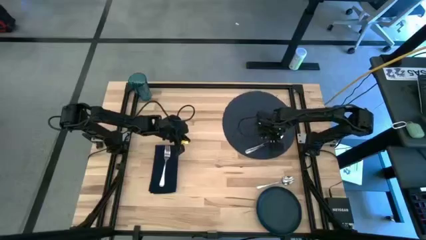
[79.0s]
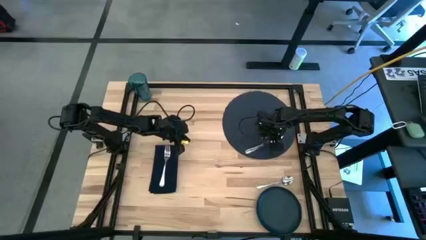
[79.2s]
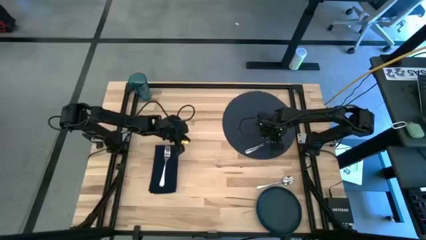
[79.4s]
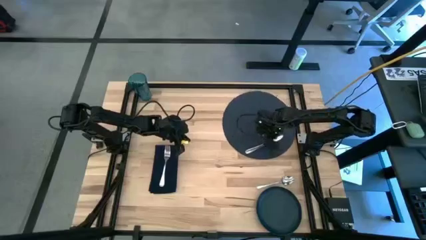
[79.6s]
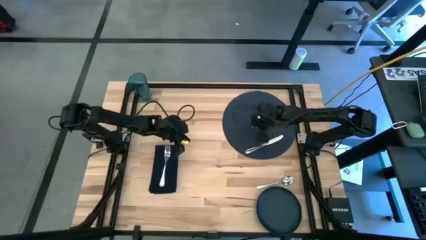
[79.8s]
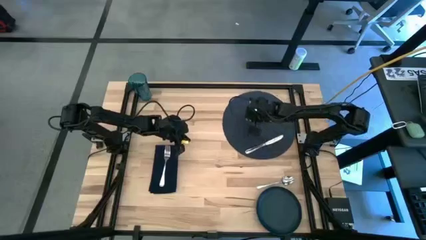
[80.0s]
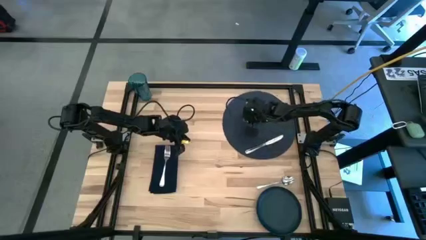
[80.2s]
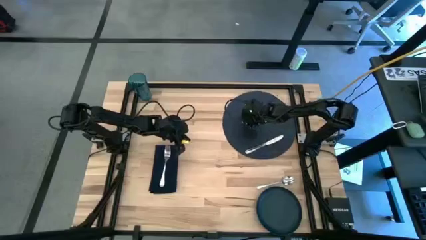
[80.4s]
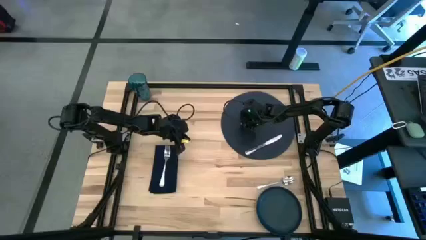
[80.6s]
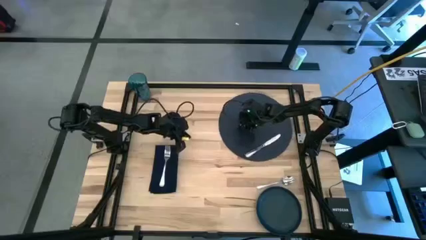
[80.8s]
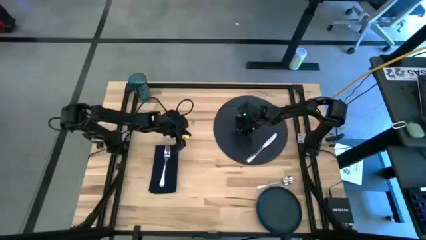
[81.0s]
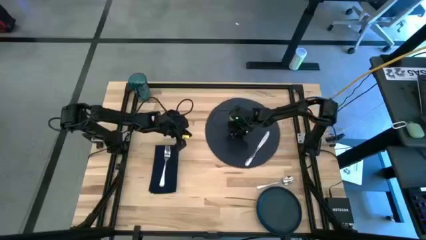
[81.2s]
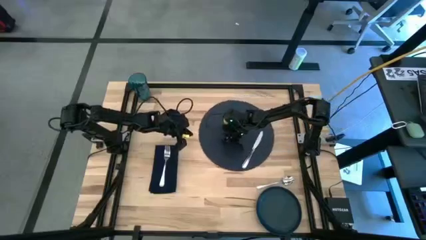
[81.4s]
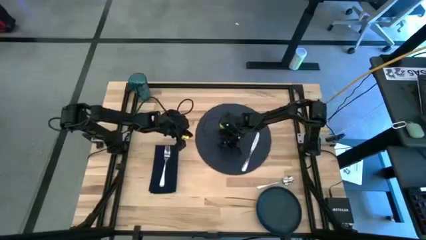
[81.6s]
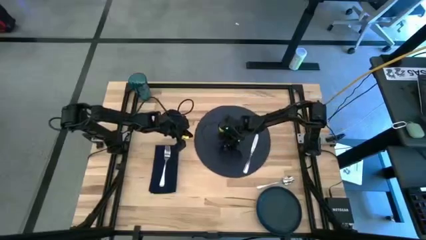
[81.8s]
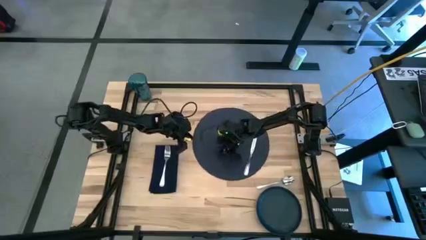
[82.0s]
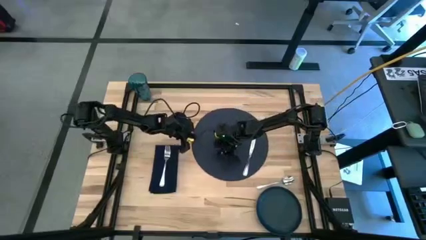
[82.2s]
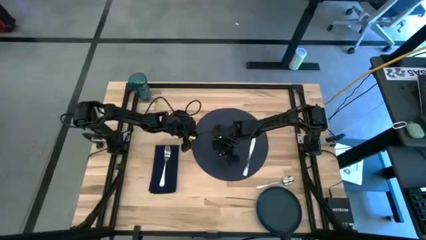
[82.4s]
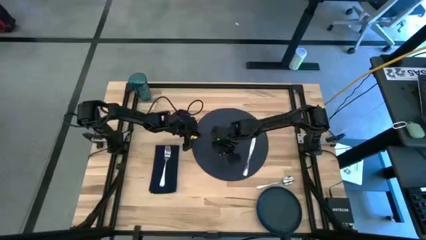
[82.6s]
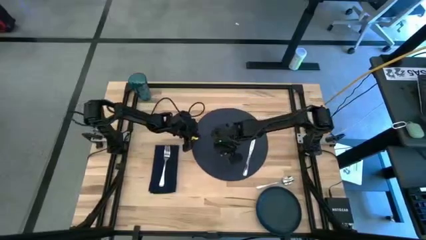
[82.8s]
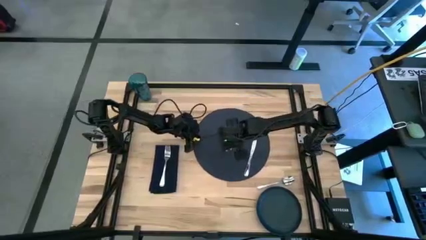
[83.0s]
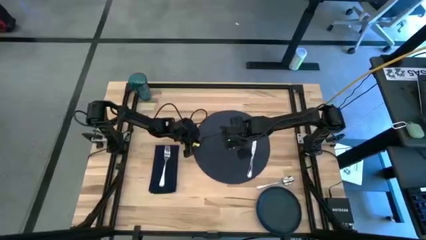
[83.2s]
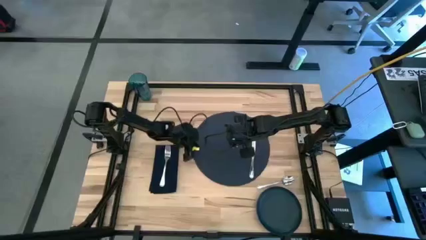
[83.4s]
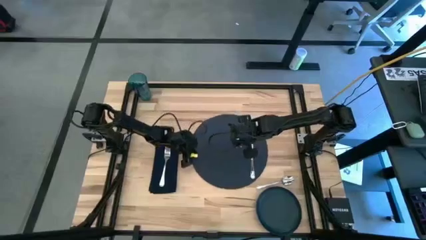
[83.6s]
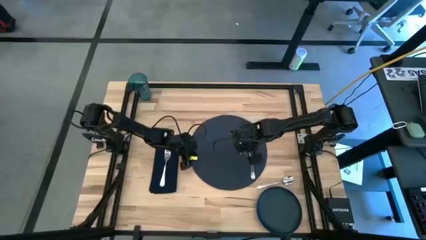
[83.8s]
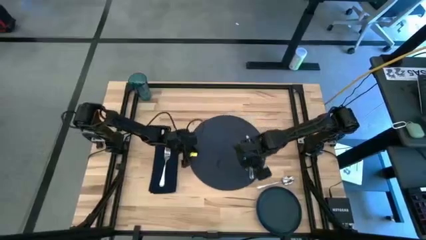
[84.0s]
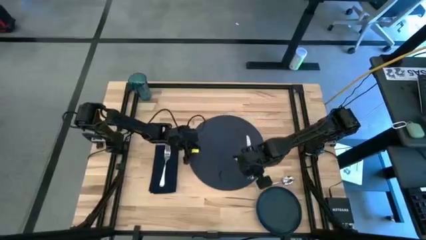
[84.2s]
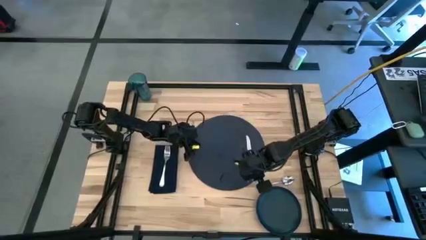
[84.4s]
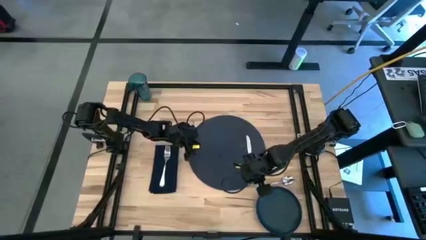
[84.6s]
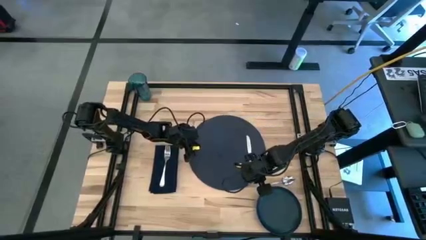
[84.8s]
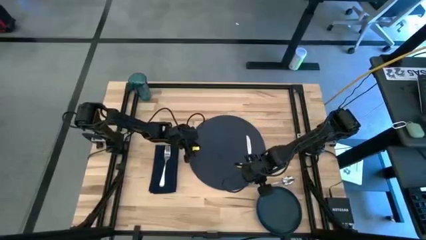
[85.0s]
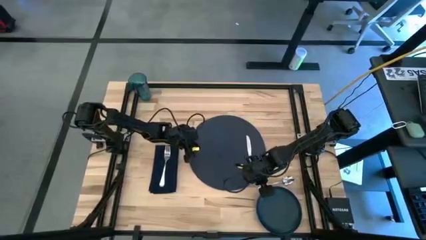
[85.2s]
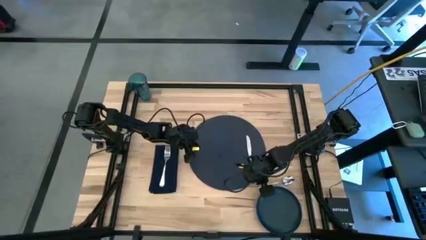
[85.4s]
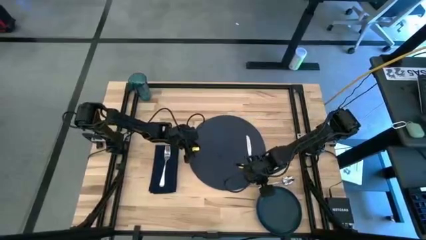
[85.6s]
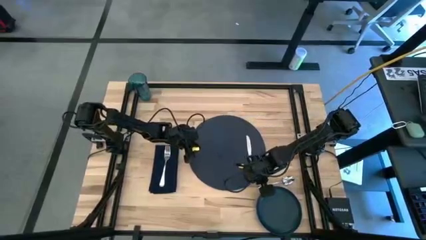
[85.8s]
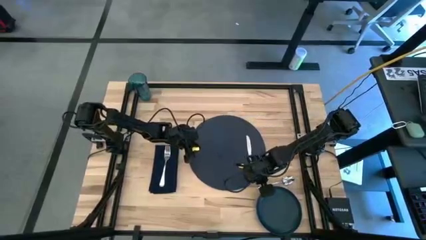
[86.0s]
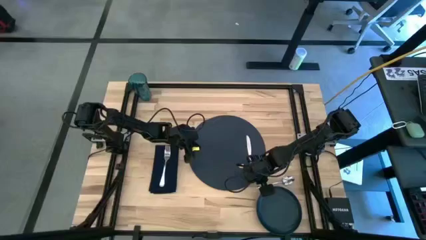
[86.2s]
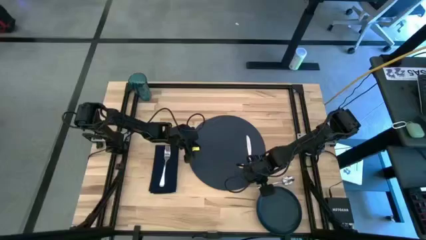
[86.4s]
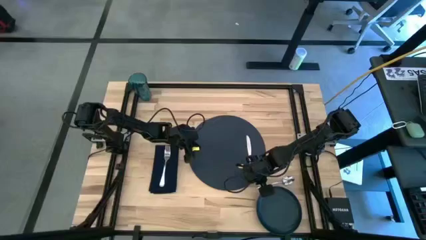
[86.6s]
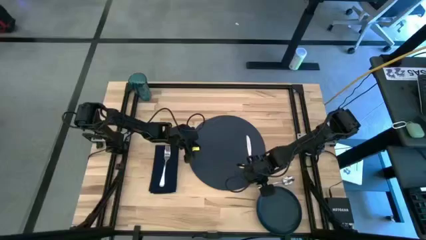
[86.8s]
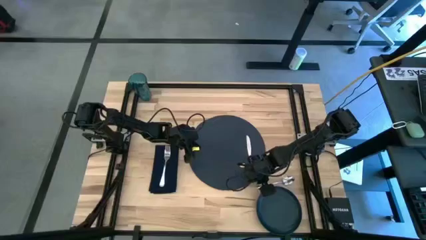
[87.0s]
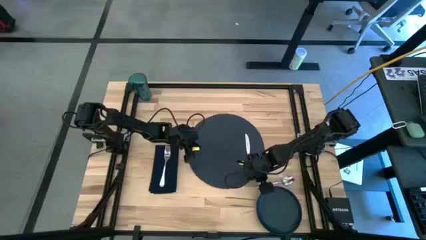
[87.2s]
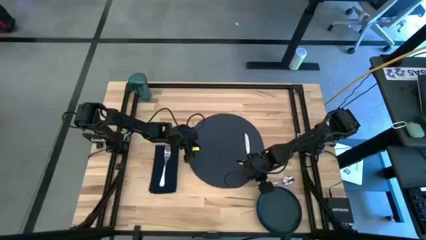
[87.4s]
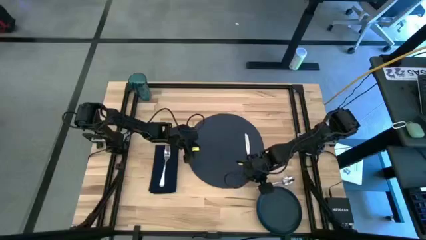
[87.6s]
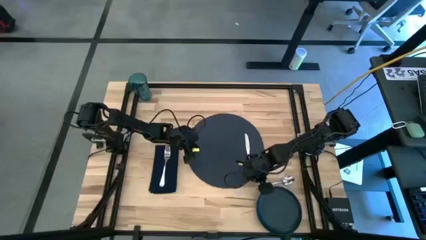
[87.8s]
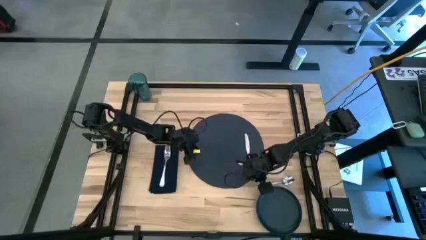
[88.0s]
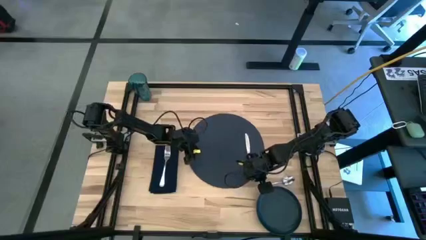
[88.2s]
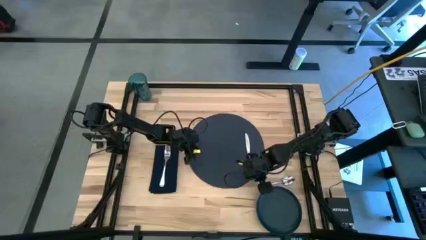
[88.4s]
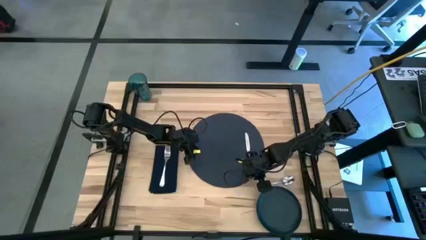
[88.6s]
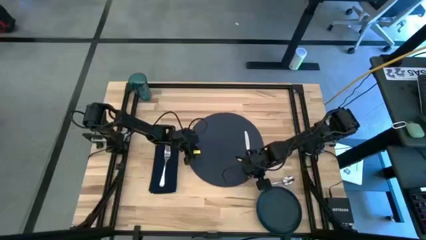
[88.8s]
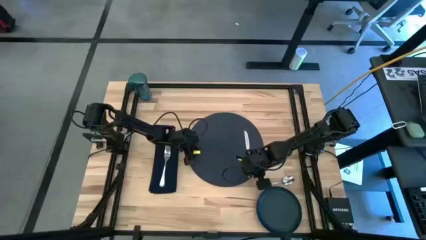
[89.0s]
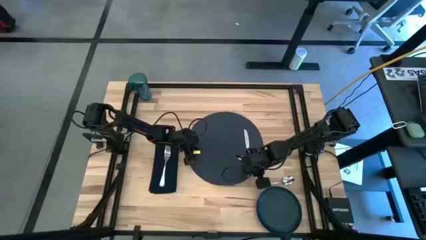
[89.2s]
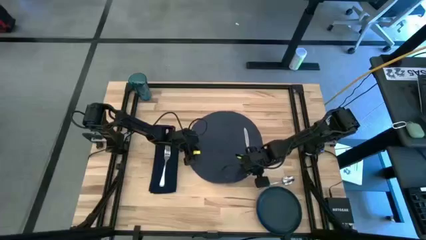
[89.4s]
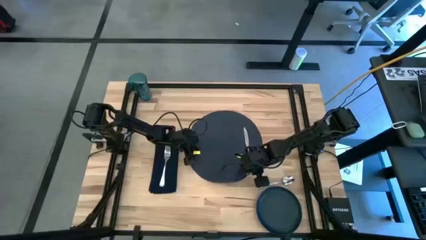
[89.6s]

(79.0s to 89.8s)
Task: Set table place
Move the black tablemat to the center

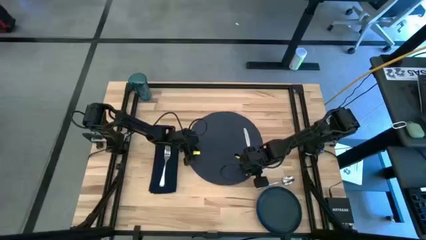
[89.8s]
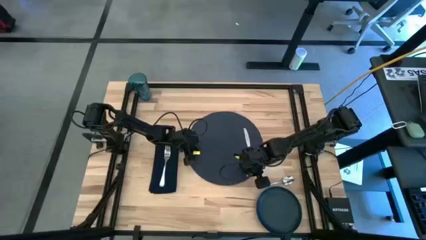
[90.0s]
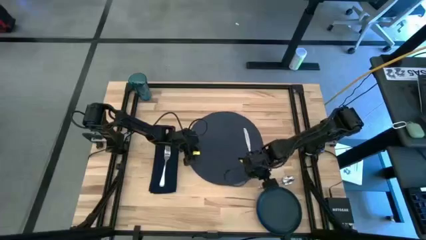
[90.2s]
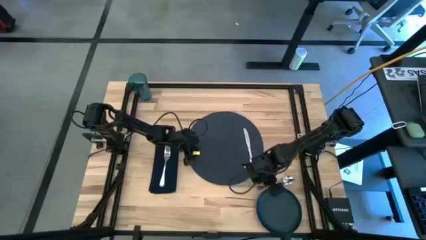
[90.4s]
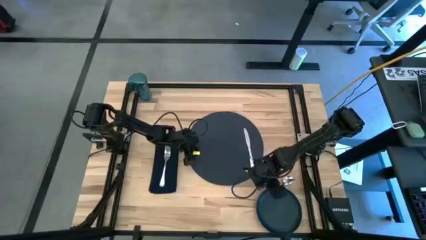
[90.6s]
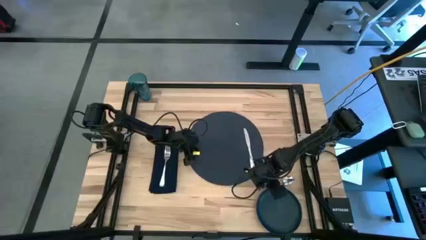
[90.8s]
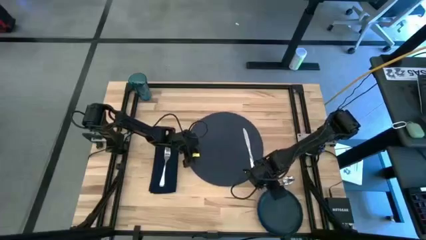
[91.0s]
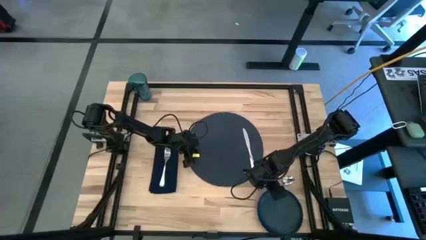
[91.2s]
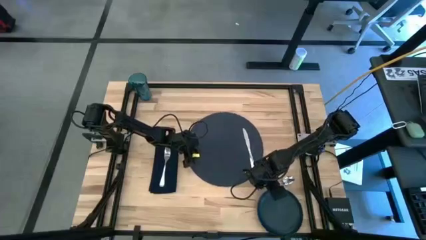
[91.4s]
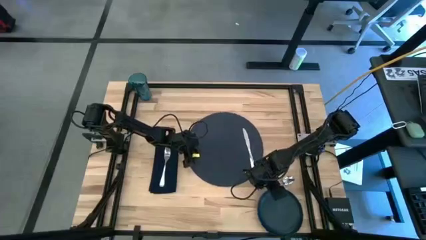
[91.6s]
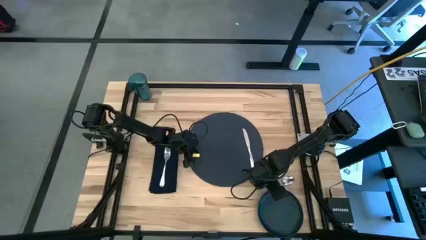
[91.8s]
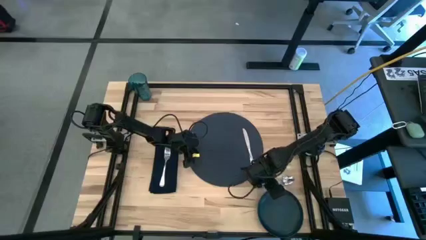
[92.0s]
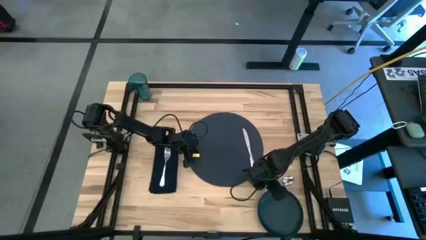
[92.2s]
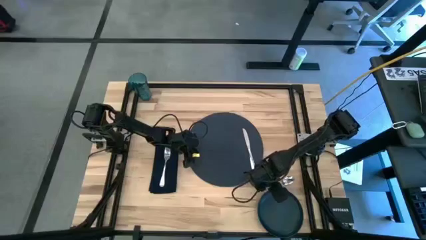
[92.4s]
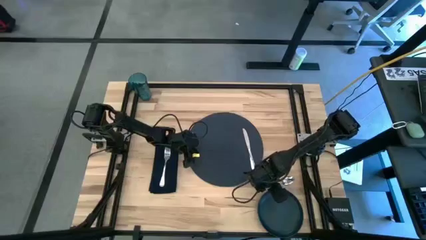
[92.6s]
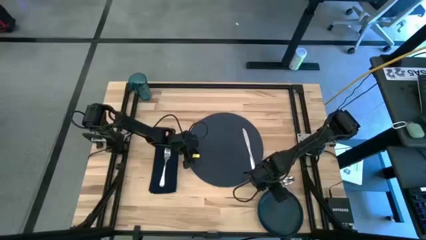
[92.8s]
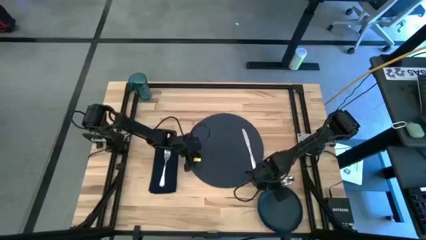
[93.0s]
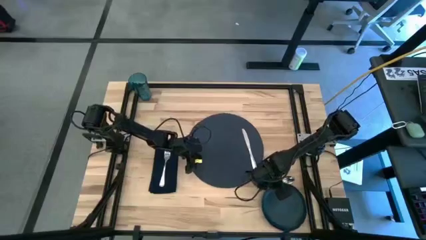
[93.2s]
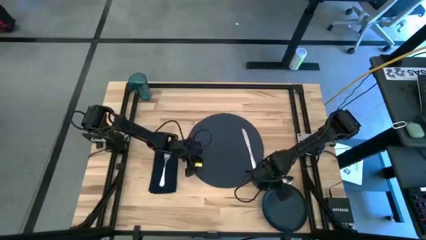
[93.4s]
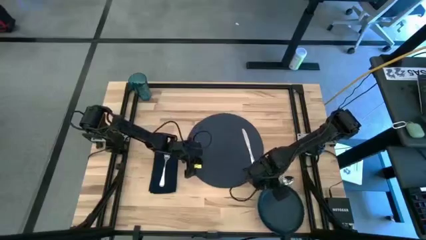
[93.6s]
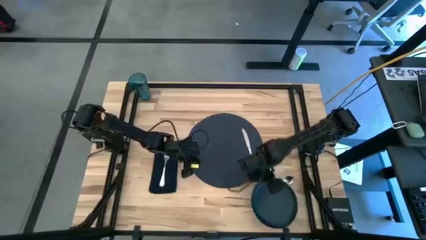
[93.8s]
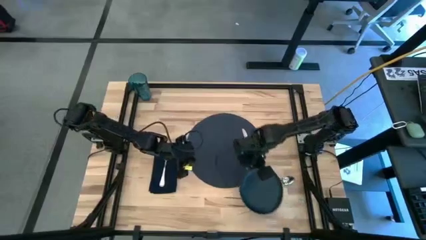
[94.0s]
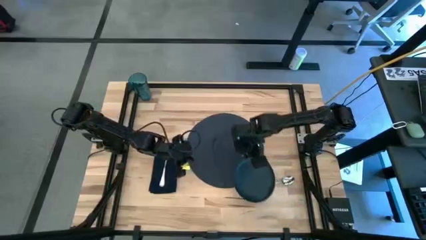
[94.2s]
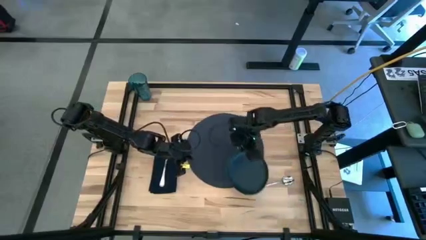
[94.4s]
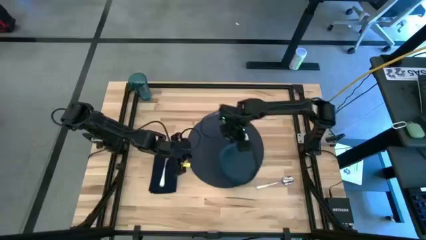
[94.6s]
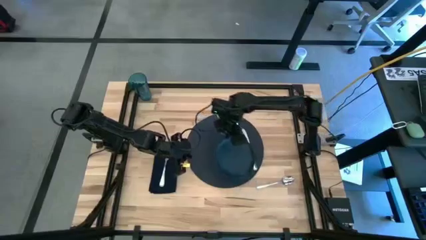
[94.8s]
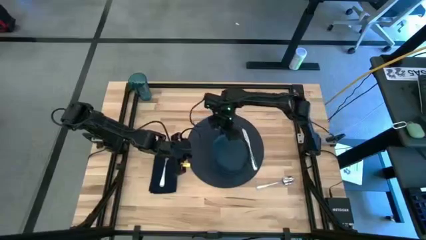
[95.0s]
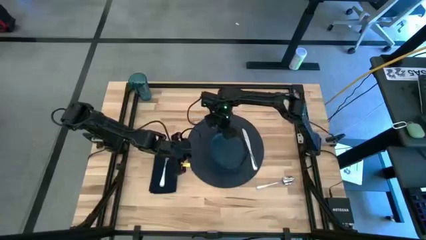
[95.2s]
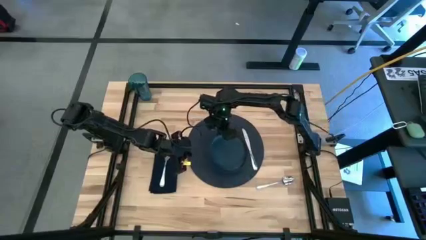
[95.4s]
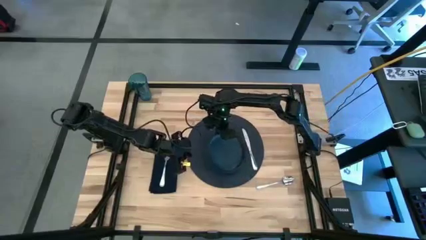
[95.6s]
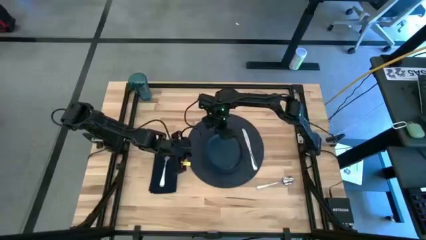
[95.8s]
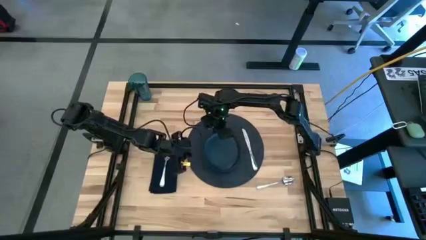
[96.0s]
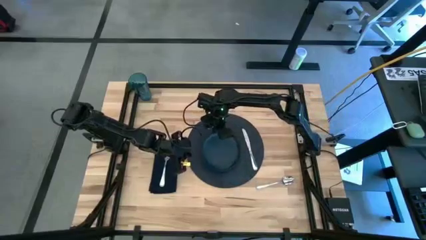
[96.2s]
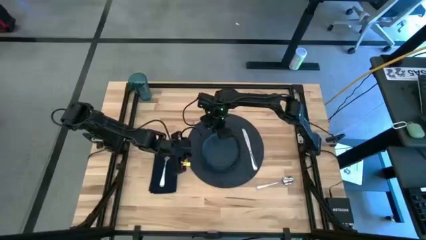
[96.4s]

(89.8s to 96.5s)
Put the dark green plate to the left of the silver table knife on the black tablemat
